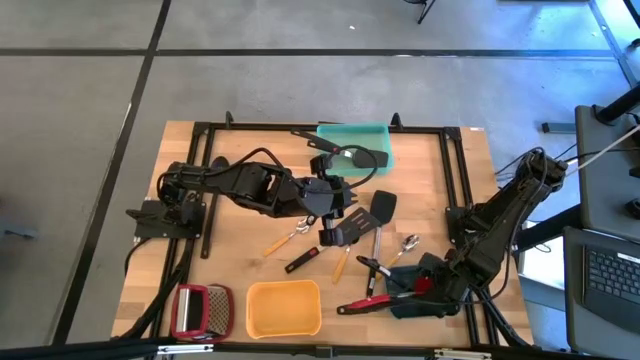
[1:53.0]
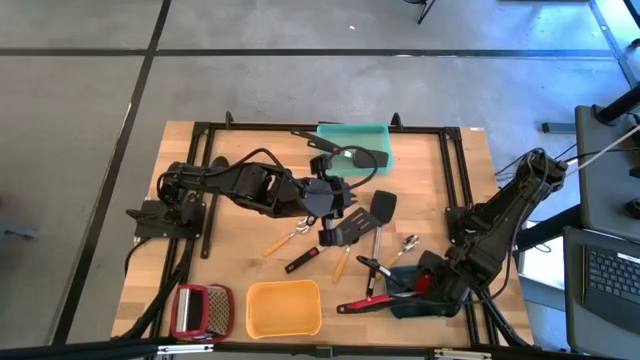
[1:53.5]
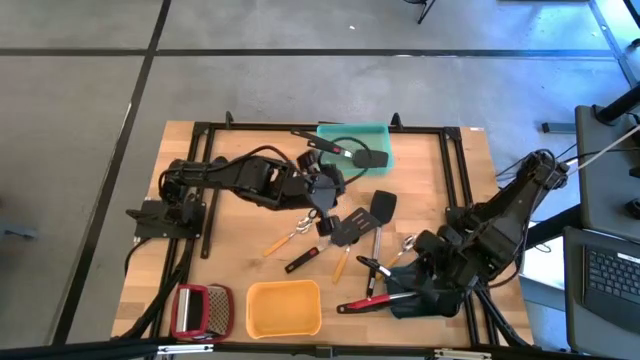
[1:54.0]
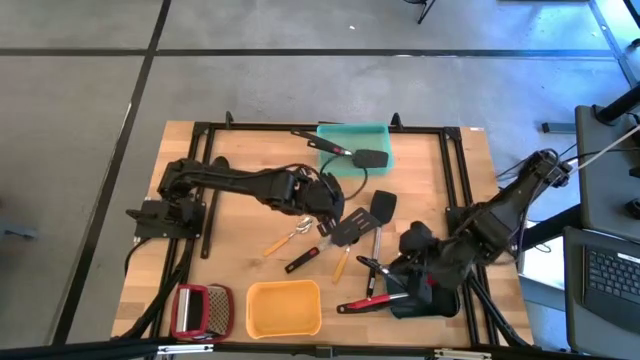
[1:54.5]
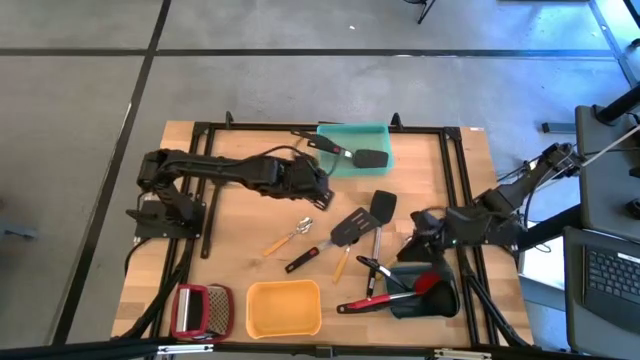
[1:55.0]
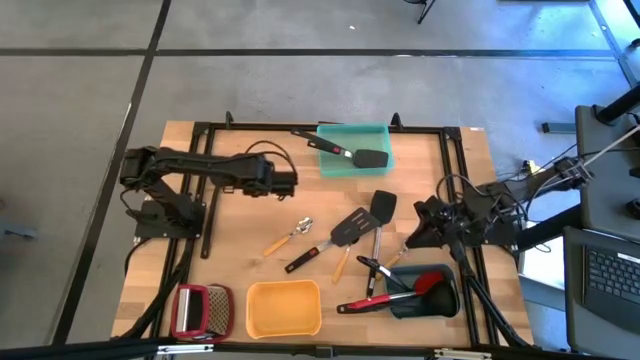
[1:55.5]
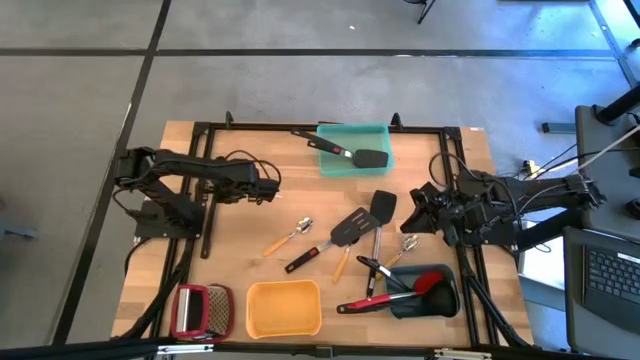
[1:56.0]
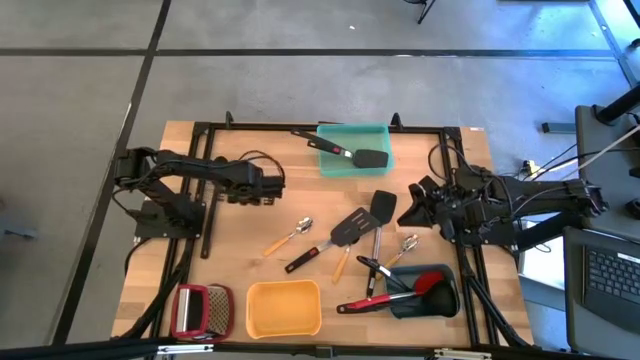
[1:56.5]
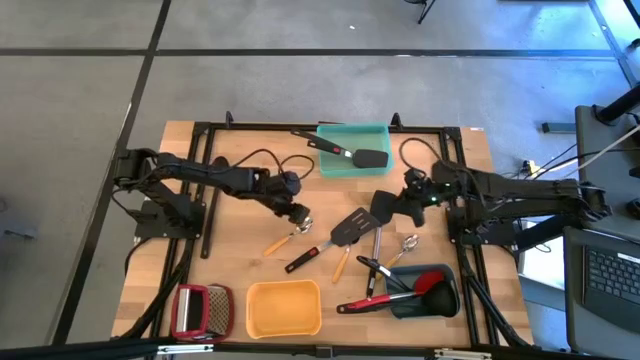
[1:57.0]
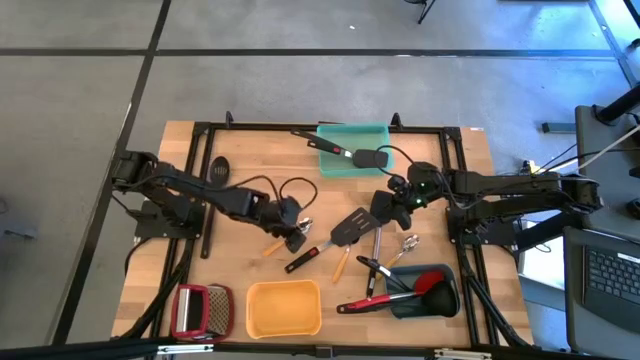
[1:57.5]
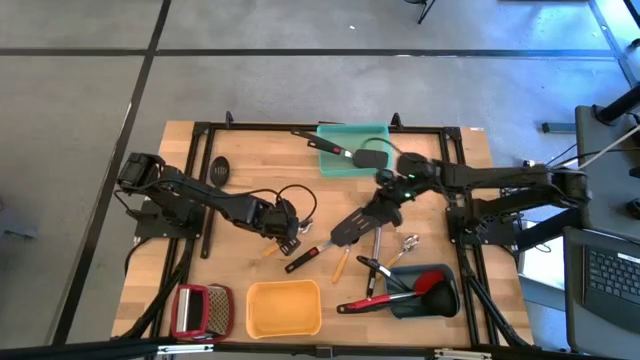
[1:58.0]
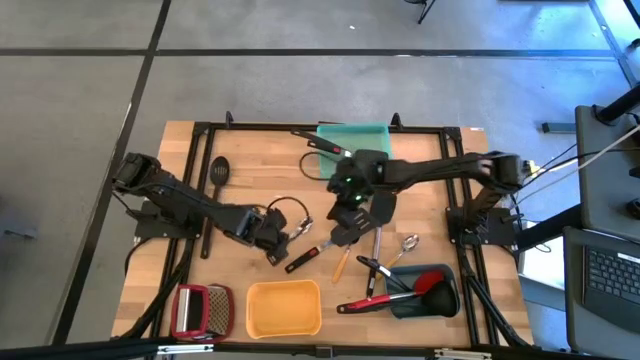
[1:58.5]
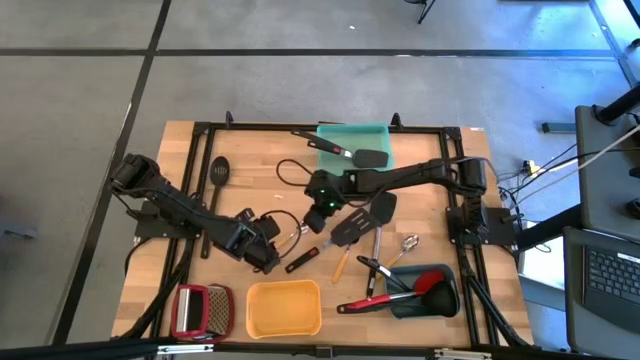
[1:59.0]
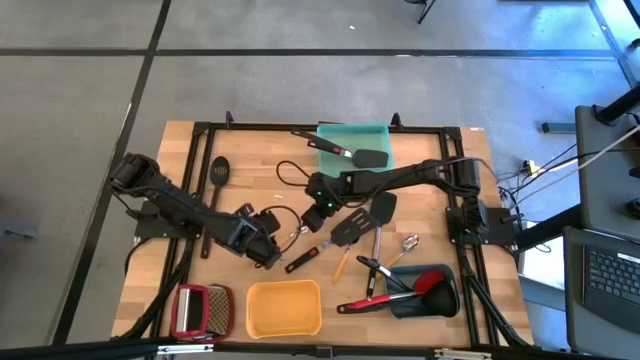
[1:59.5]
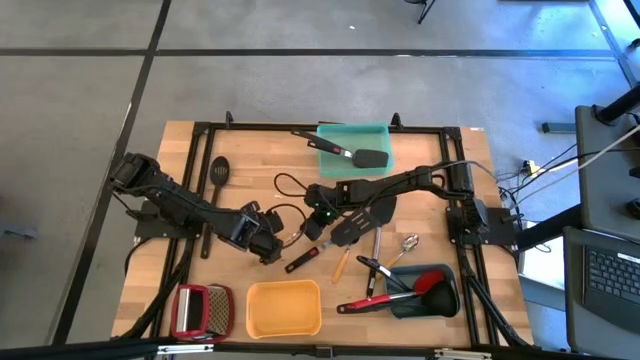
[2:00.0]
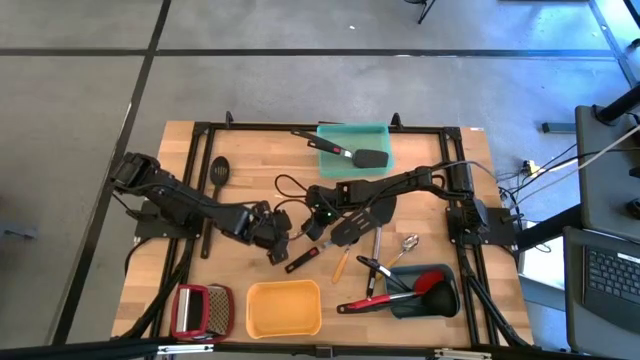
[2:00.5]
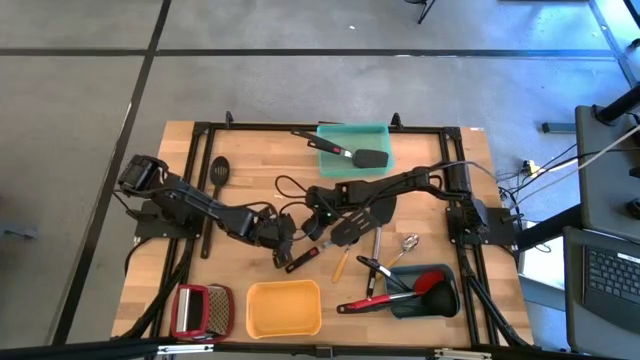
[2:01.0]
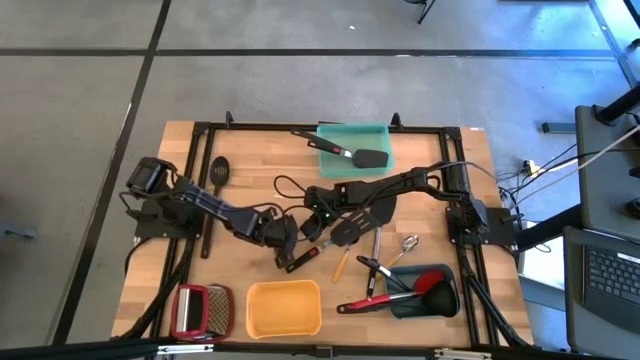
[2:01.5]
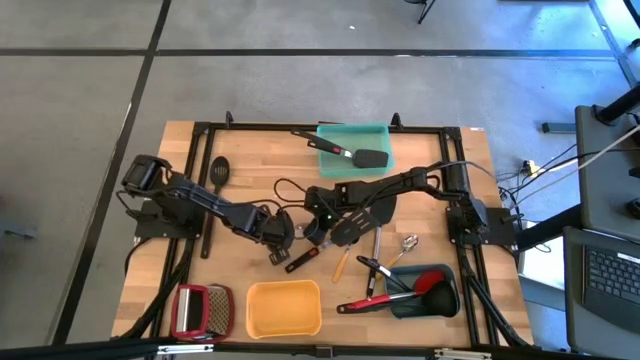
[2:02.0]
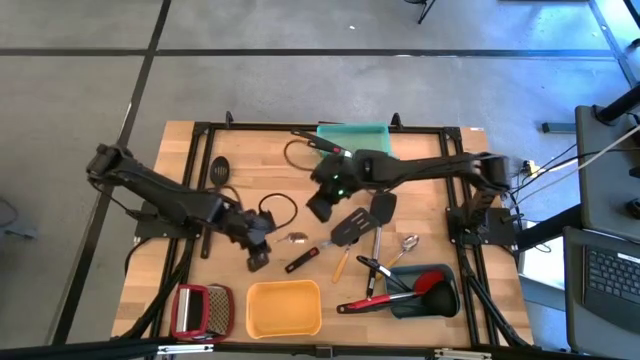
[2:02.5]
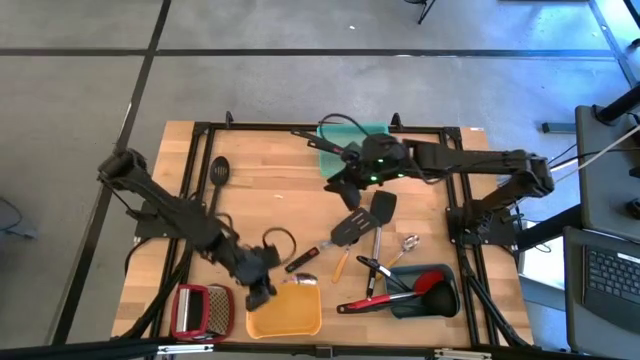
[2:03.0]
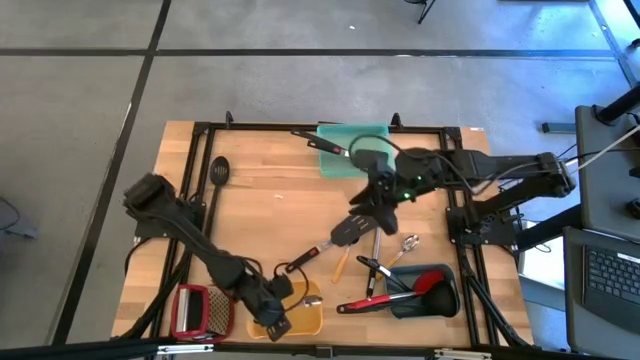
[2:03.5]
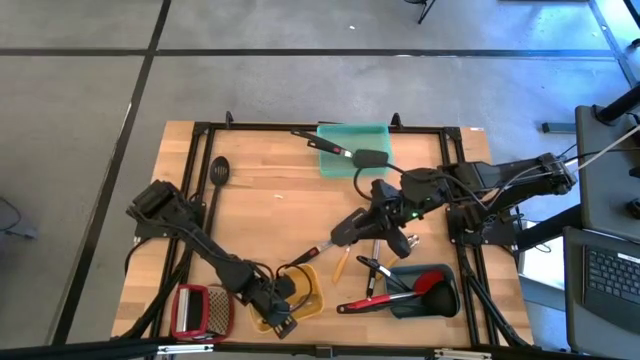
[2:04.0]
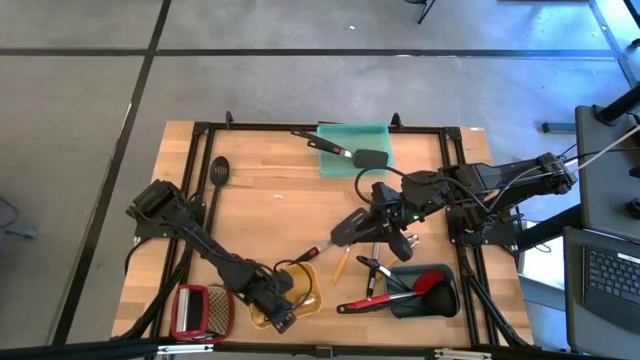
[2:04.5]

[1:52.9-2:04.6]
Task: Pick & Place Kitchen Items
Put the yellow spoon into the yellow bin

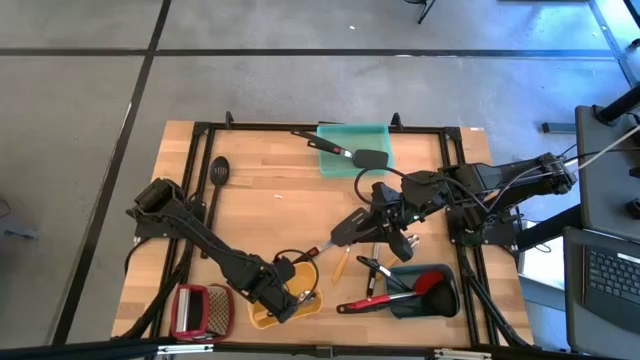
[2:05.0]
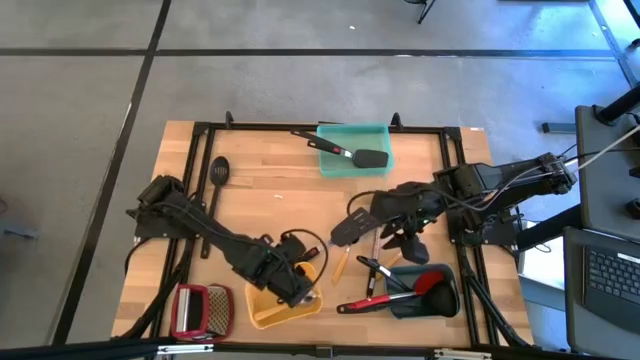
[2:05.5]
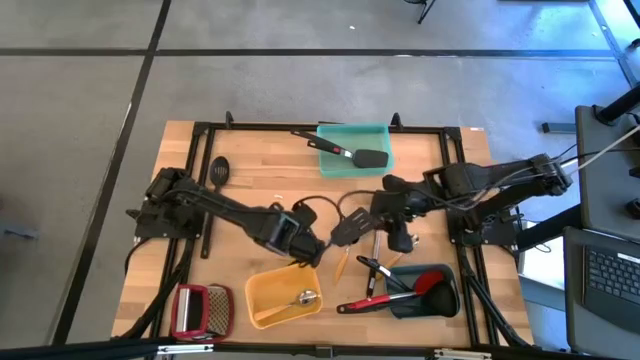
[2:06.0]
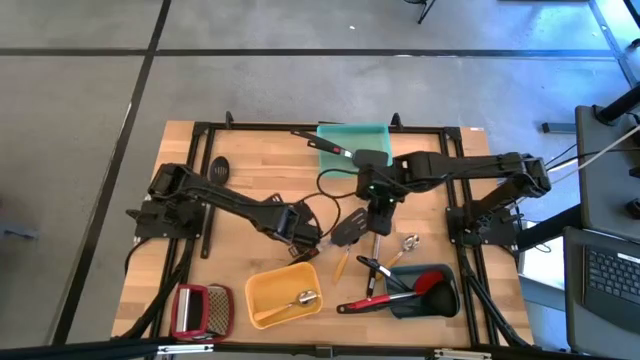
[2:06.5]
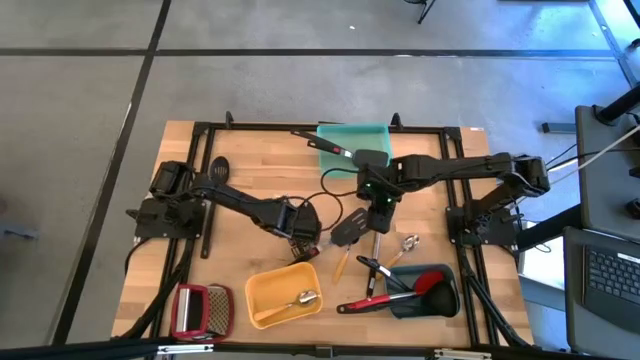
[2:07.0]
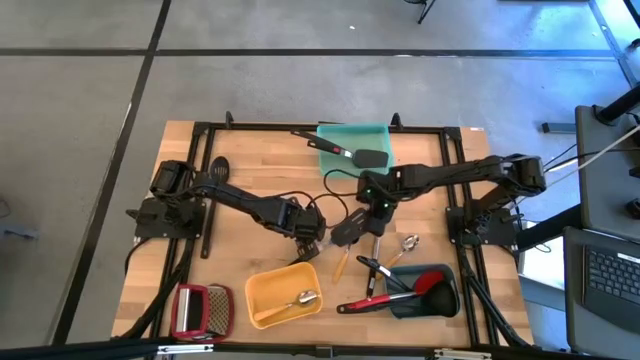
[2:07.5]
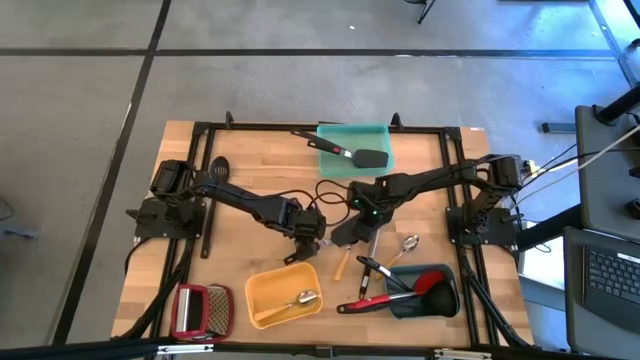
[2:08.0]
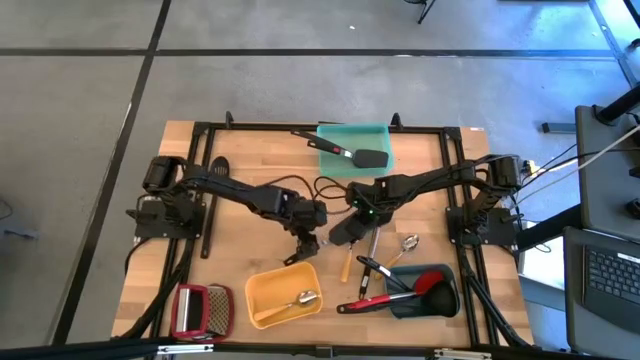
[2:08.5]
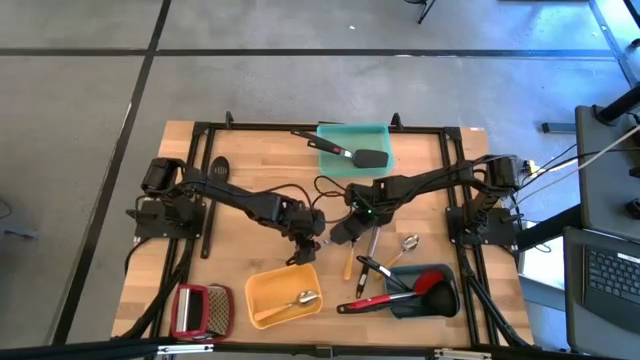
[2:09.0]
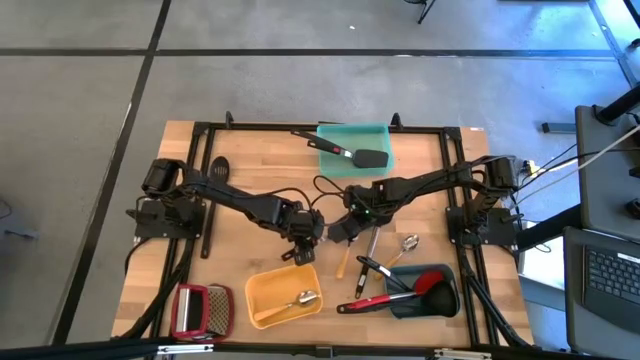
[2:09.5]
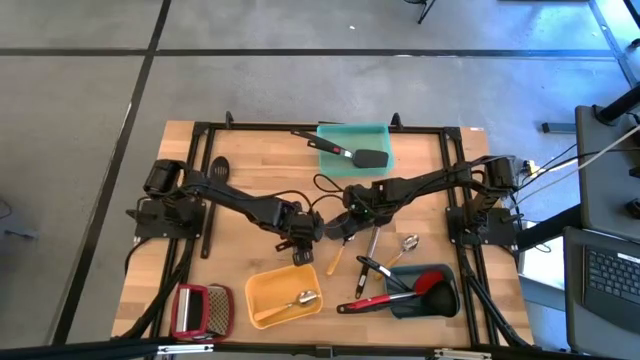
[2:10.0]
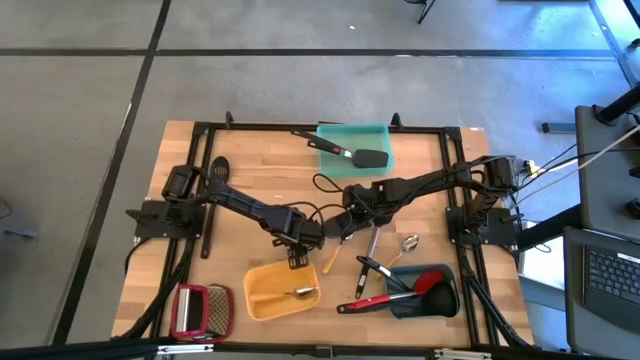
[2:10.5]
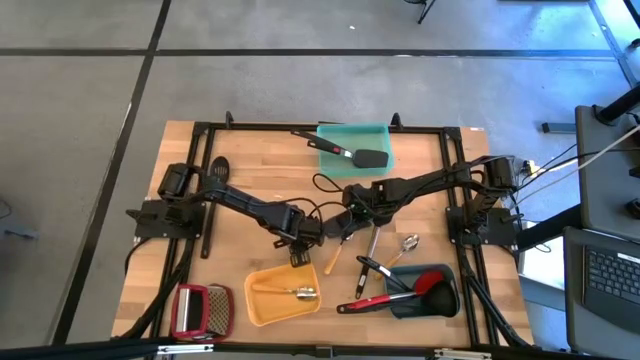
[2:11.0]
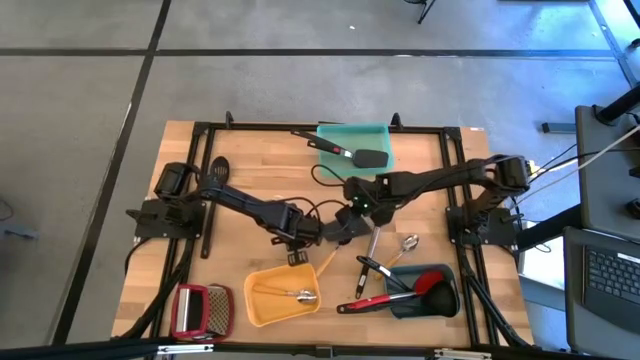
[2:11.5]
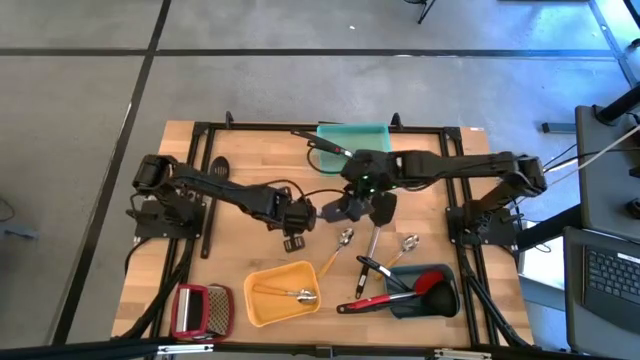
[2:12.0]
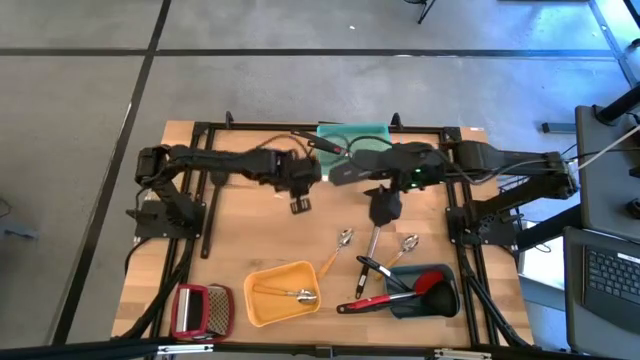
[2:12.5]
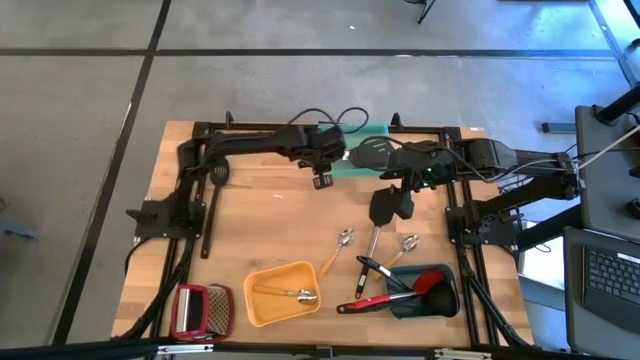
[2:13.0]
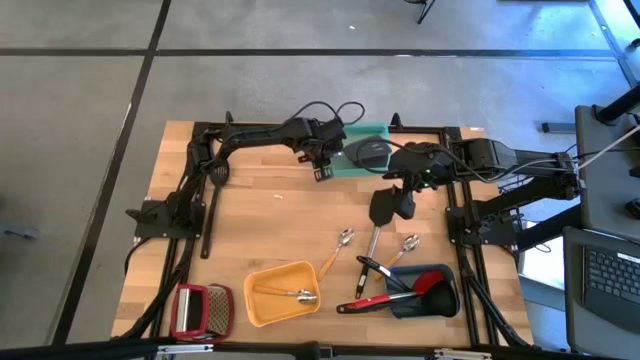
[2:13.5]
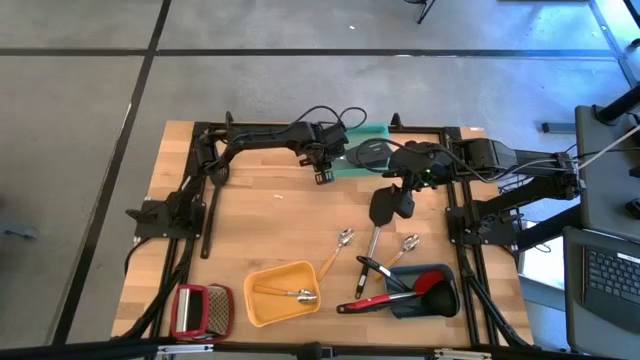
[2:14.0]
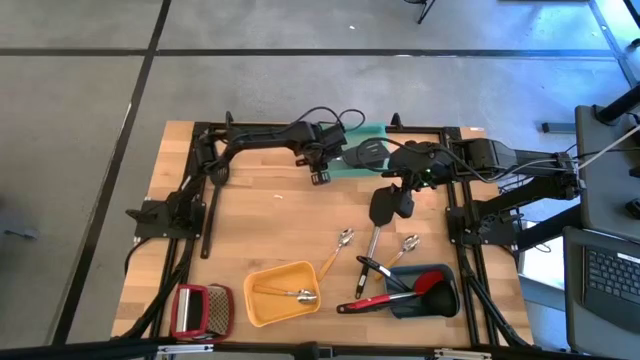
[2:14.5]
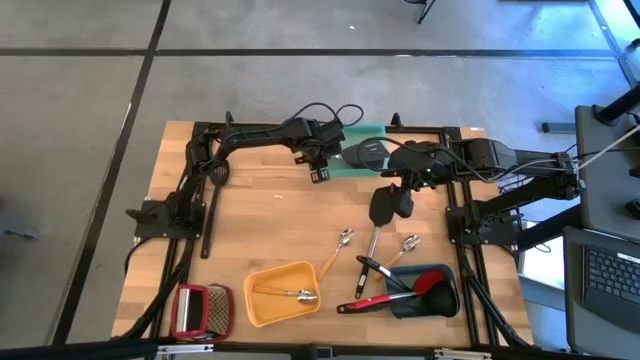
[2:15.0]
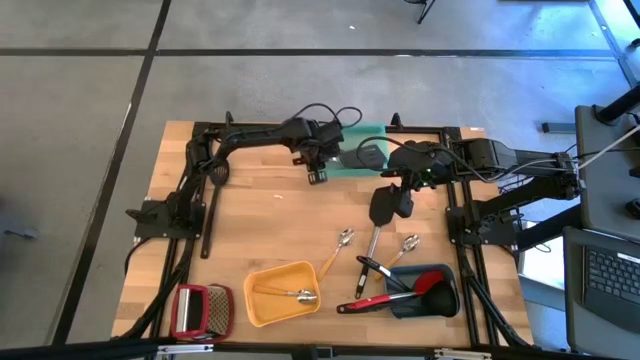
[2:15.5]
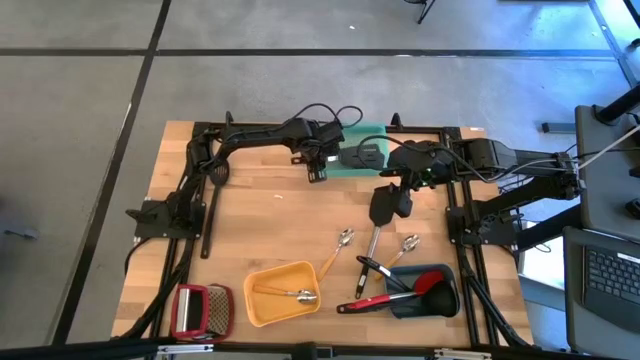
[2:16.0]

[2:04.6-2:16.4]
Put the black spatula into the green bin
